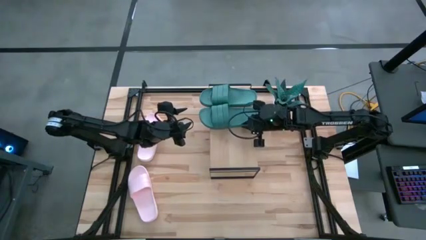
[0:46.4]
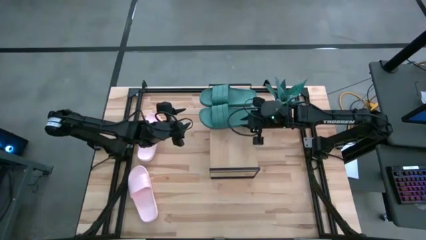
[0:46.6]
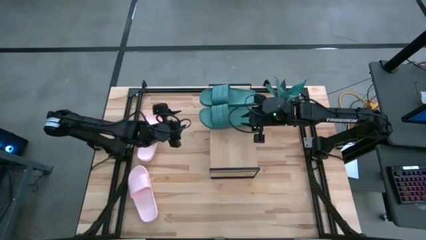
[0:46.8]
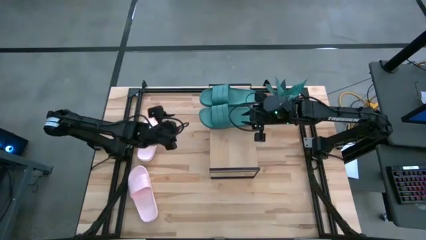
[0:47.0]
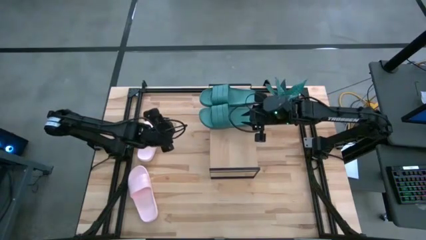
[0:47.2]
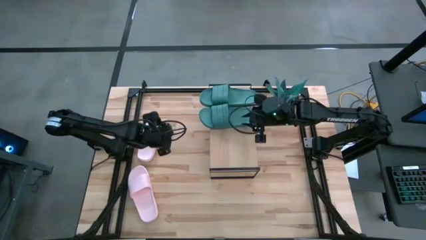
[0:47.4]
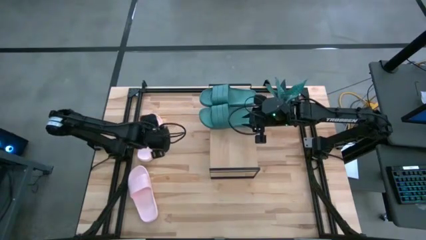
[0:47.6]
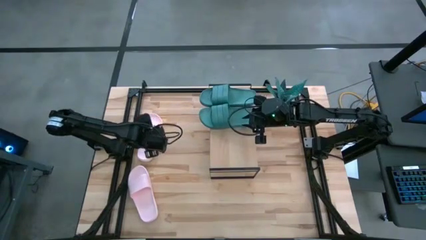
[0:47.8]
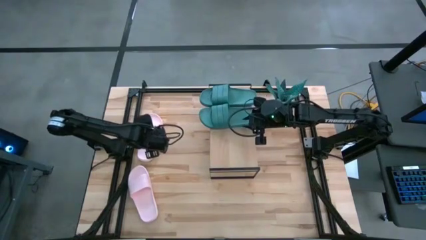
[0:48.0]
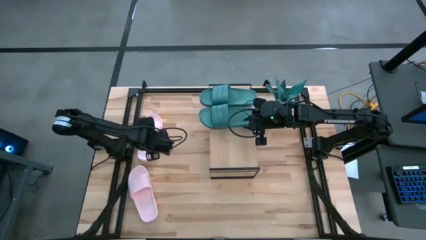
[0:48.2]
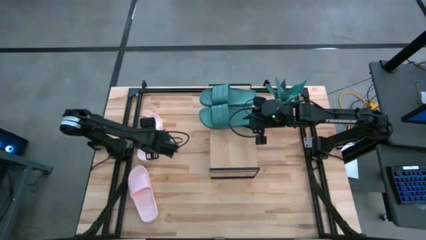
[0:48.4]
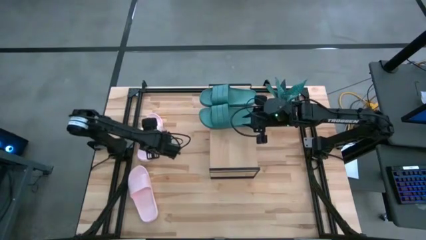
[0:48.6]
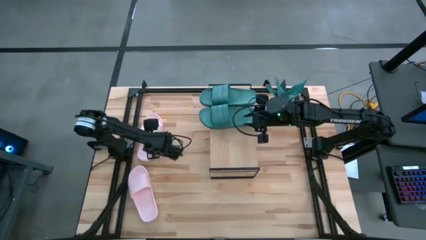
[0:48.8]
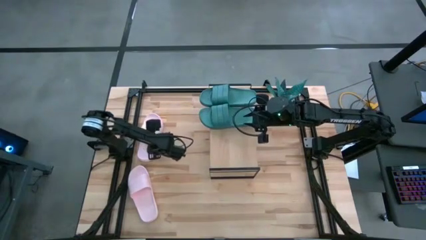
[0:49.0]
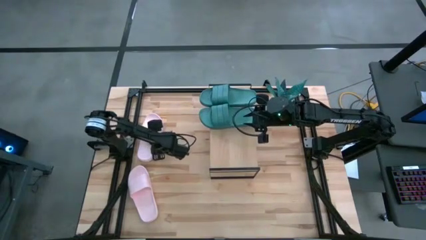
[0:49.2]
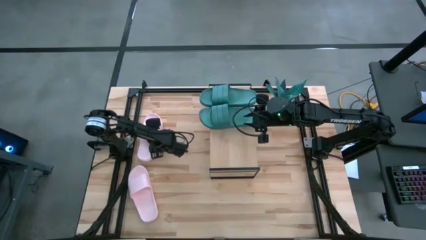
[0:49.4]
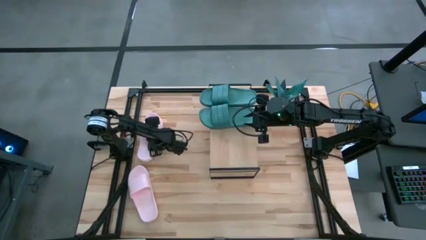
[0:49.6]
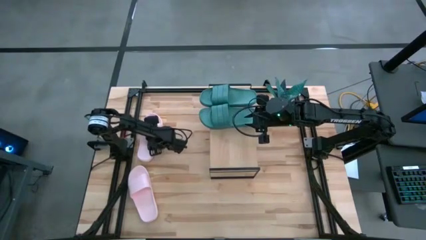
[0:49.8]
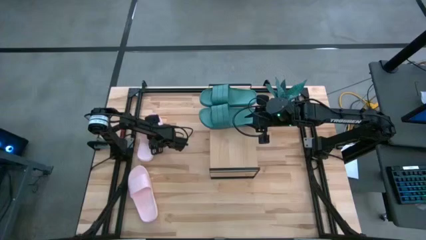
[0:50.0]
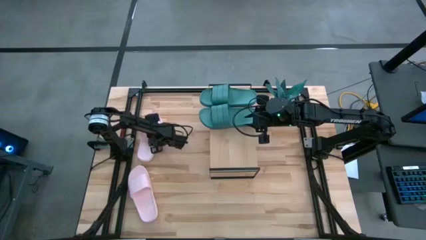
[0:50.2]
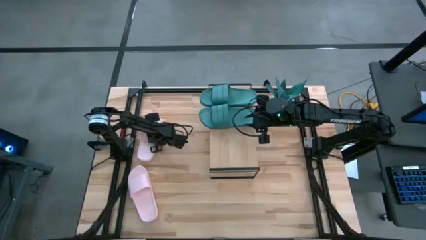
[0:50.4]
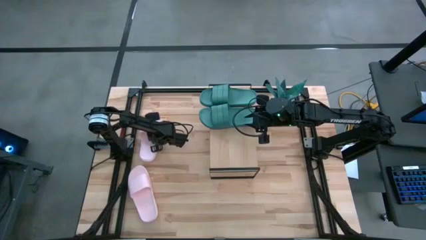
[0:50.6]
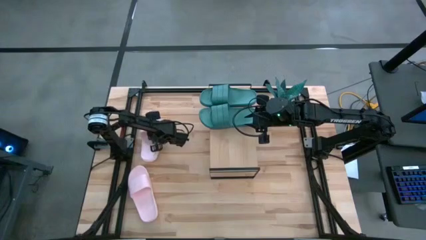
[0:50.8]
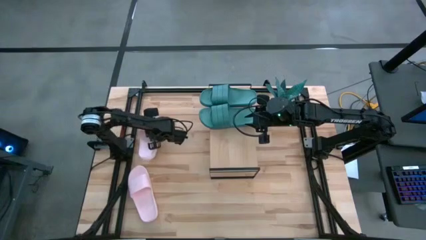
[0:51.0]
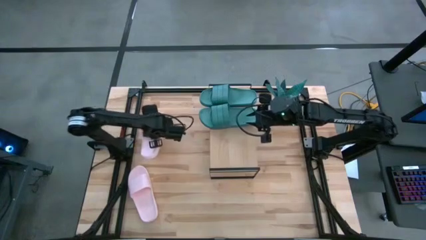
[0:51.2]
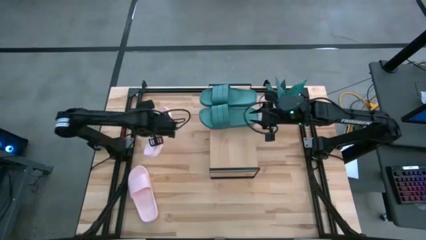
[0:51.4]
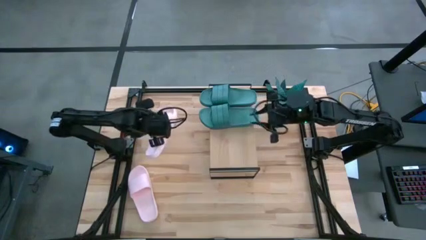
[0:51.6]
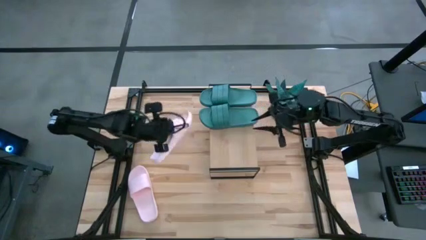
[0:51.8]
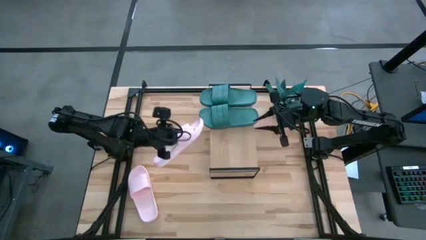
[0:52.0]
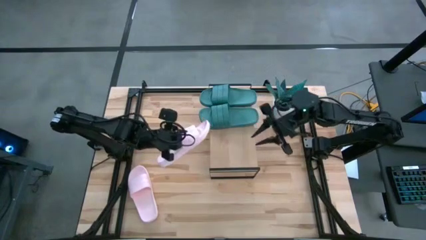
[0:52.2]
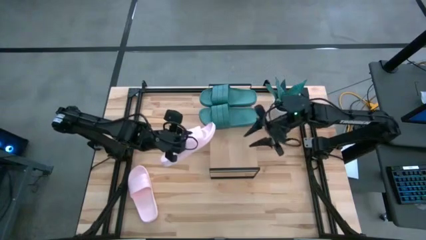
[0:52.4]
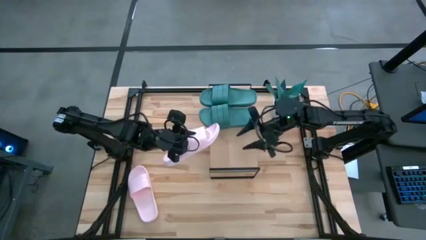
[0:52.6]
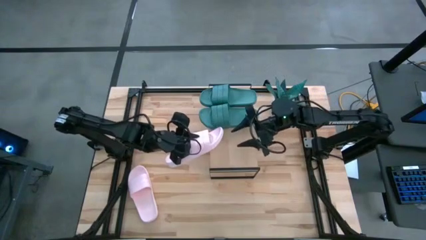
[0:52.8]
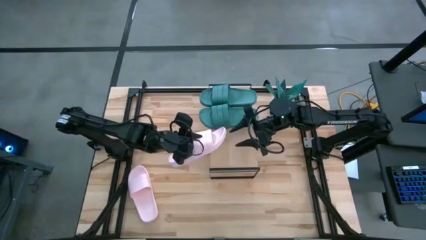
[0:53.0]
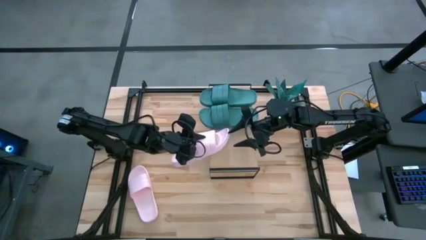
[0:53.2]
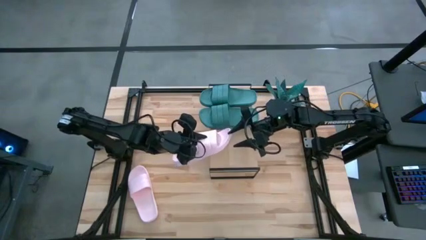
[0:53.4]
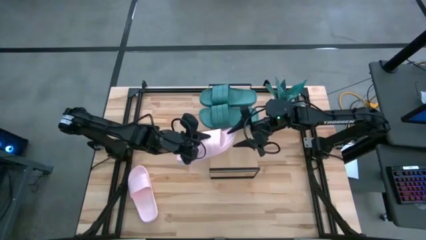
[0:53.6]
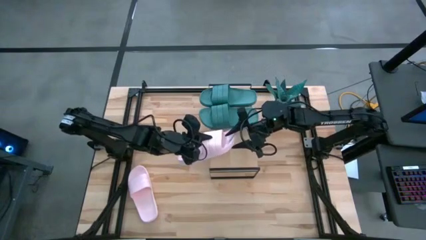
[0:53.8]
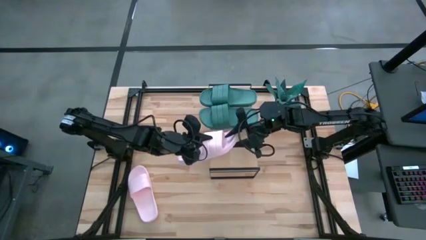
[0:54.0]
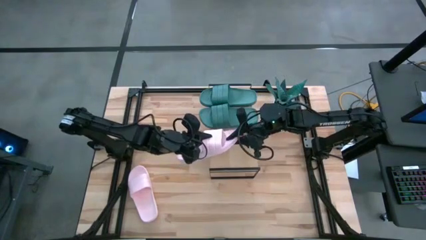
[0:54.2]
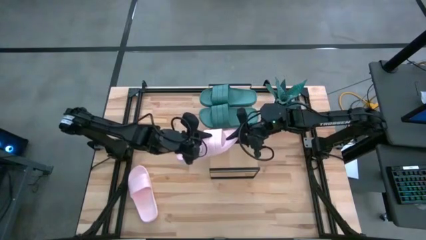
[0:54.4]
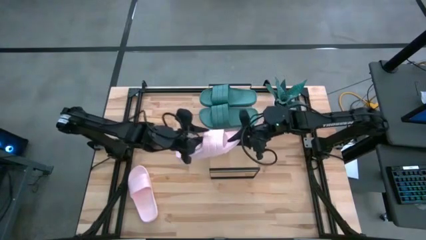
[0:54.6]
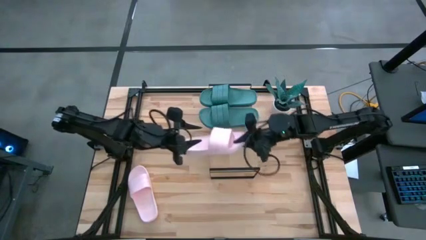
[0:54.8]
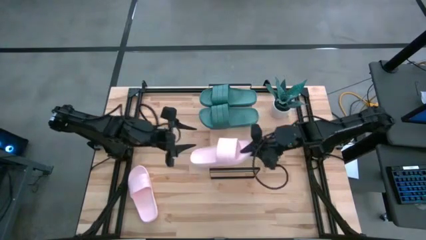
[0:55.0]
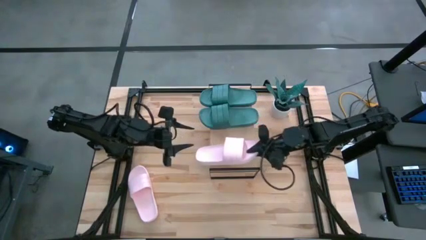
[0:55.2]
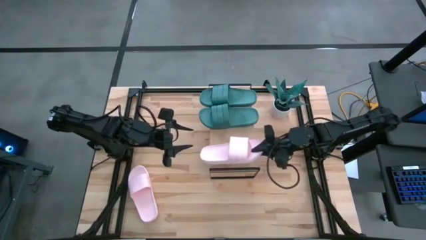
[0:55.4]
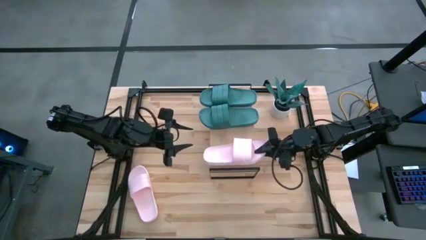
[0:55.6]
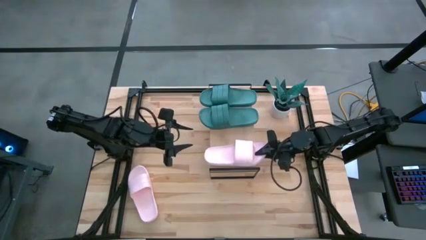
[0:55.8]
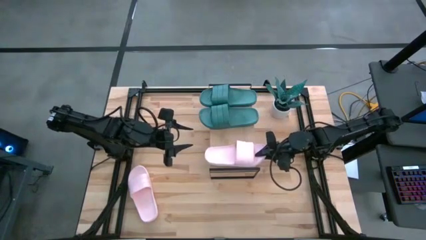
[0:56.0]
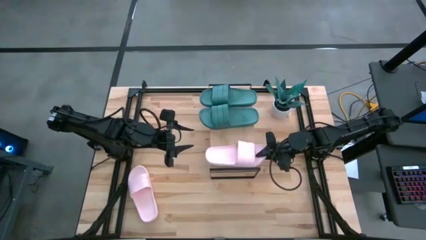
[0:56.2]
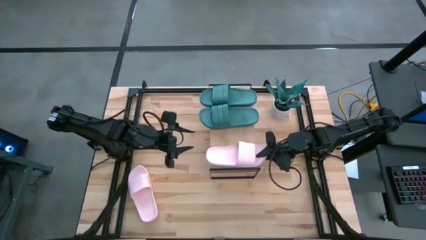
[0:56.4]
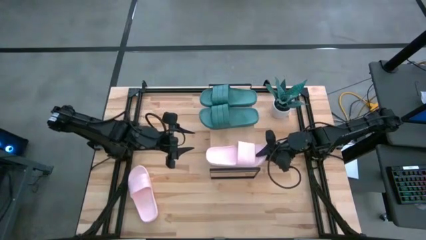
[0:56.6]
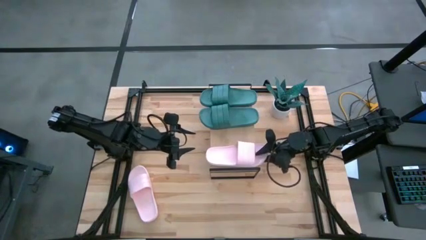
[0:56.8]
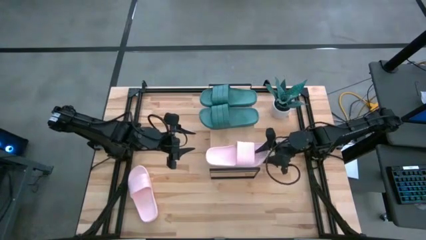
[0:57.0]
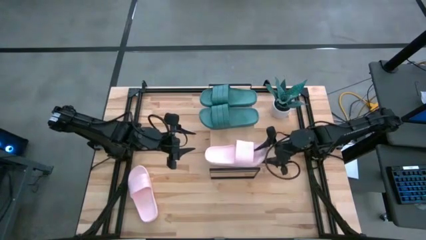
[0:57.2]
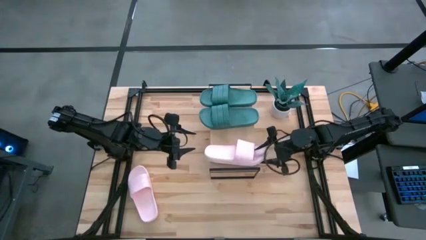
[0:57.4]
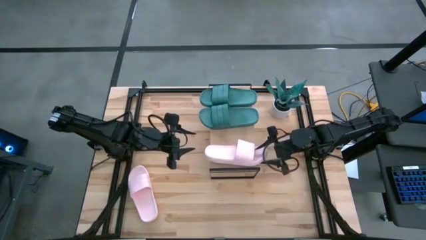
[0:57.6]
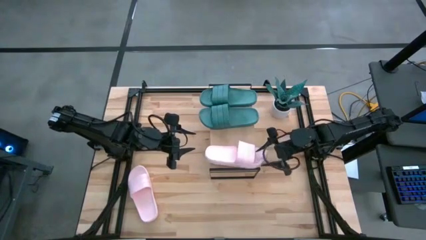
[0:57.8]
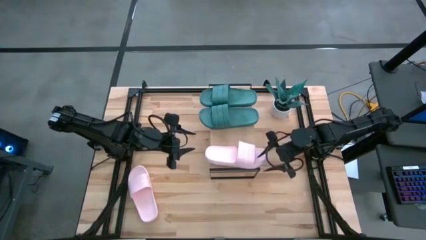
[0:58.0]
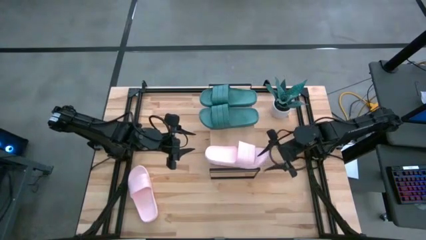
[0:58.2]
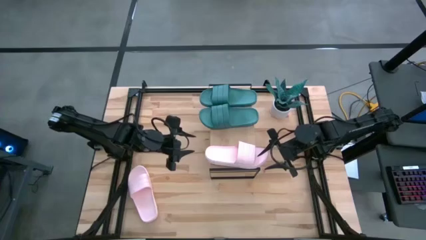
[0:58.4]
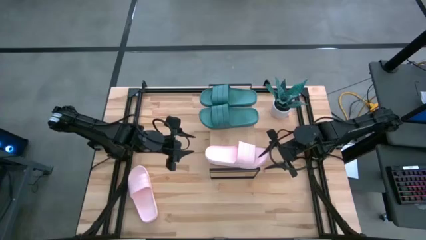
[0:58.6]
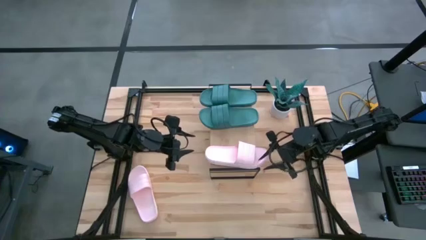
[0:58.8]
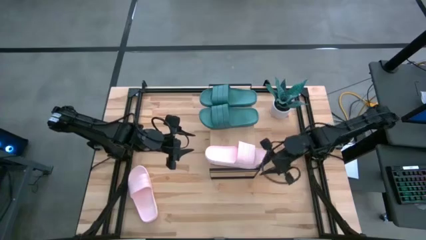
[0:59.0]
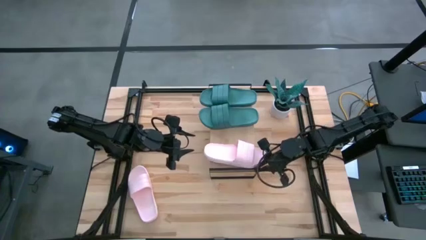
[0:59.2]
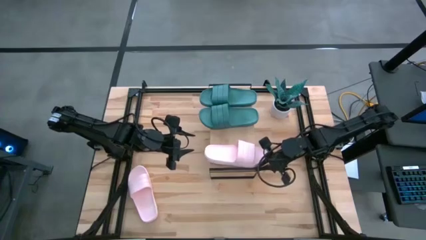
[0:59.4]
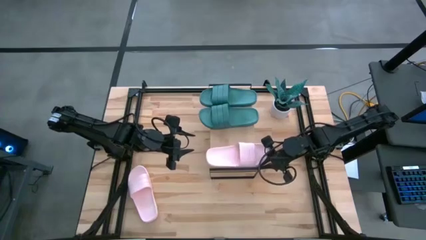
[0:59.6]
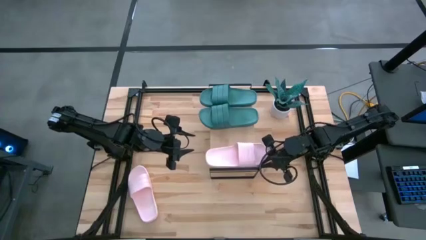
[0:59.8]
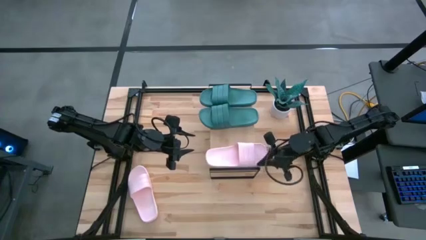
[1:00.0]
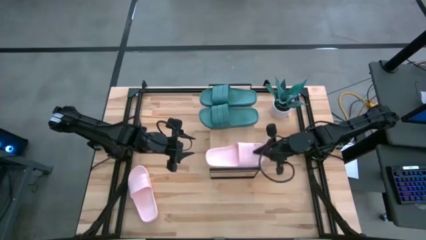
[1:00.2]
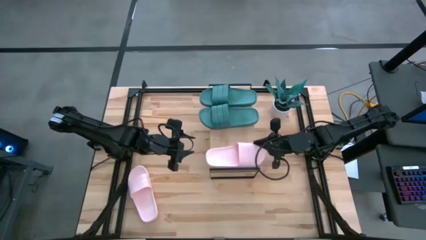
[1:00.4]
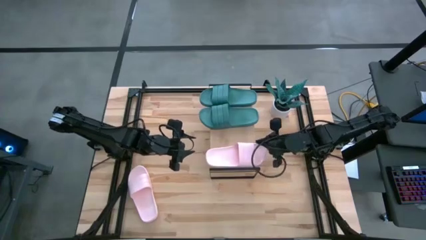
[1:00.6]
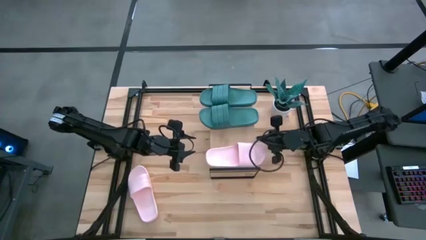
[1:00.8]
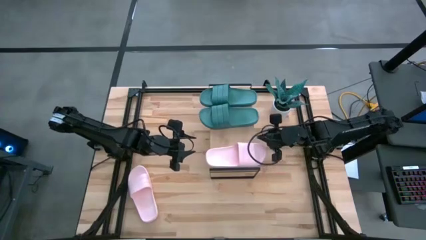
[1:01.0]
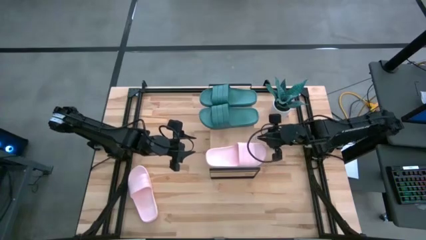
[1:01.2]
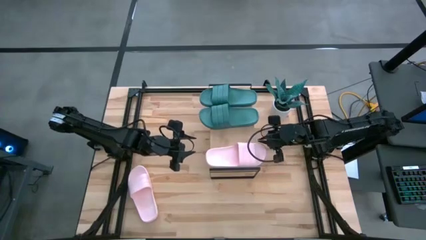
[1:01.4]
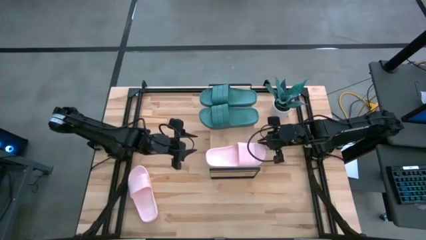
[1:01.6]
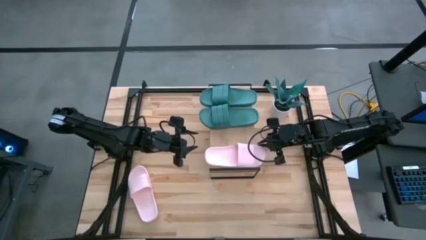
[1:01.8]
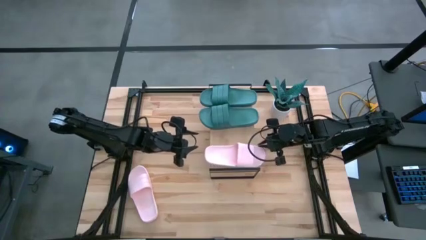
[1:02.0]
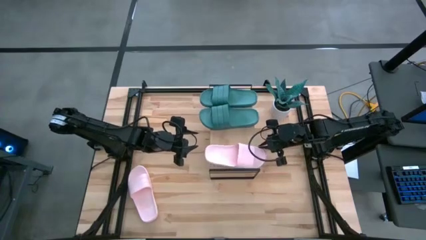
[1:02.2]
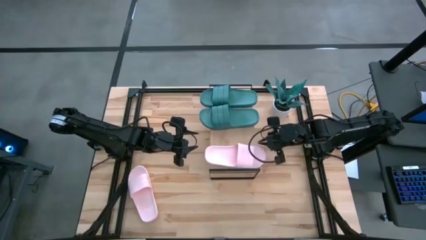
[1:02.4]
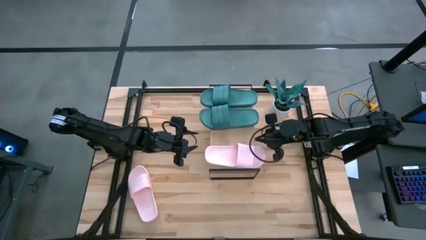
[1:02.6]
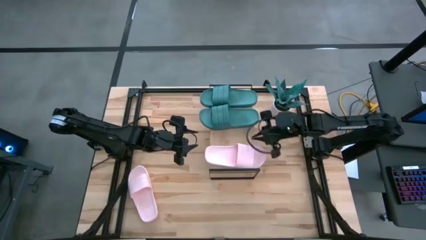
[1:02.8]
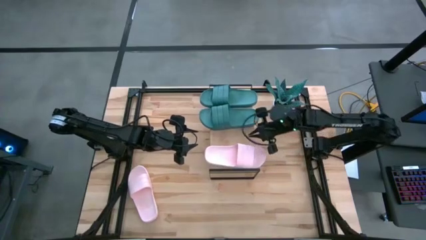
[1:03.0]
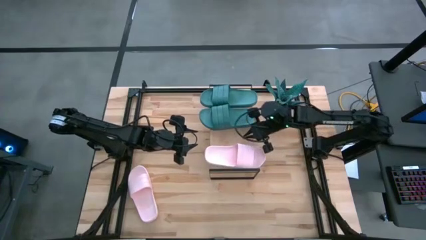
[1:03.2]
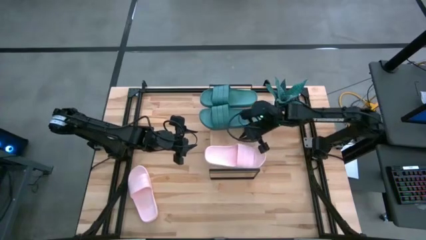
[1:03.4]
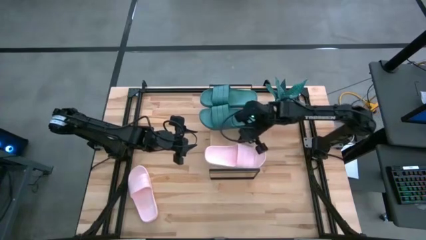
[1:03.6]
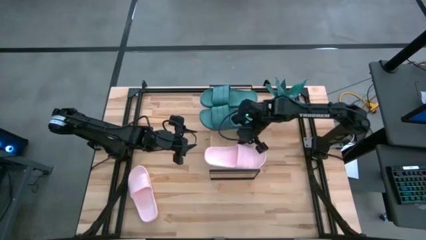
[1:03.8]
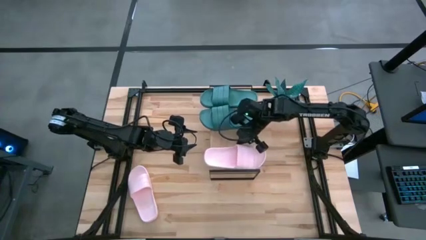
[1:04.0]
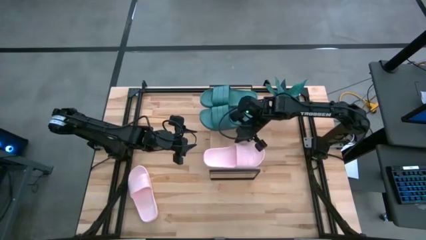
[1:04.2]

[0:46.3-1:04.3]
Task: Pick and place slides into the shelf
Put the right pink slipper on the shelf
